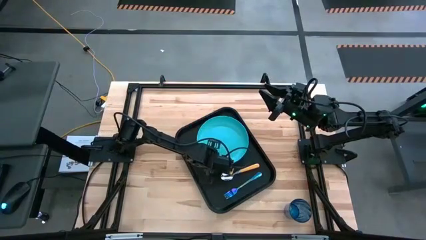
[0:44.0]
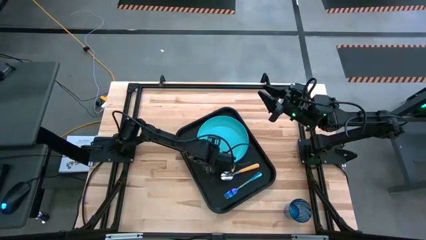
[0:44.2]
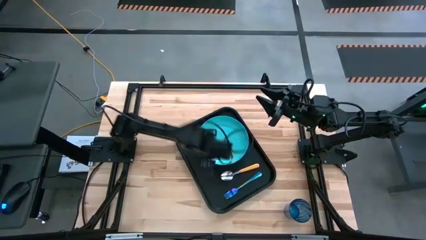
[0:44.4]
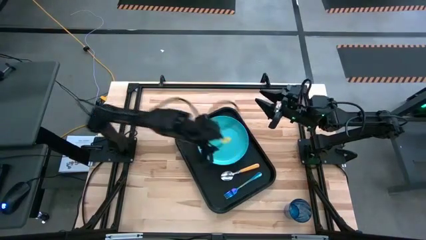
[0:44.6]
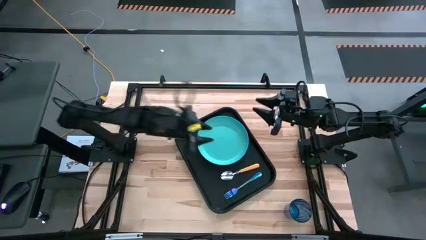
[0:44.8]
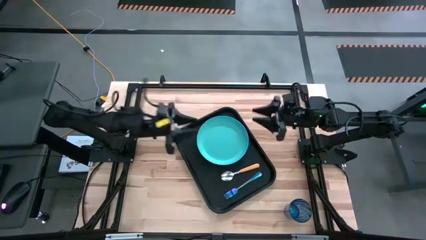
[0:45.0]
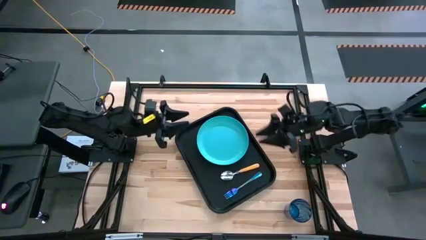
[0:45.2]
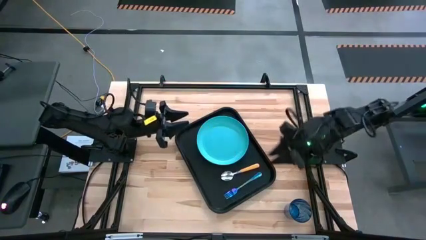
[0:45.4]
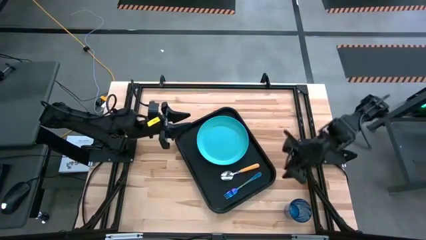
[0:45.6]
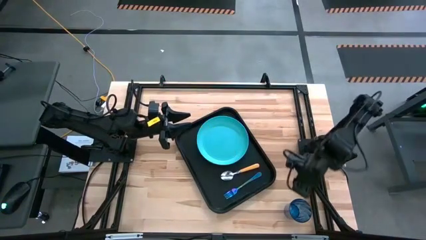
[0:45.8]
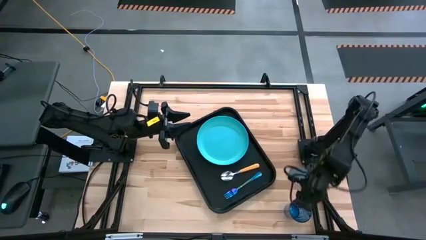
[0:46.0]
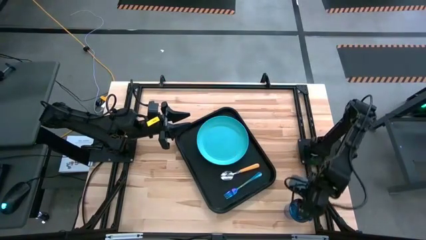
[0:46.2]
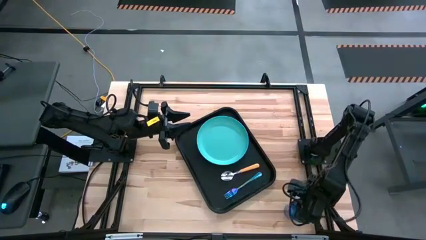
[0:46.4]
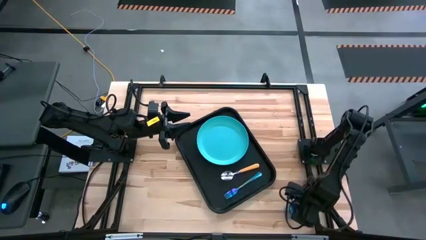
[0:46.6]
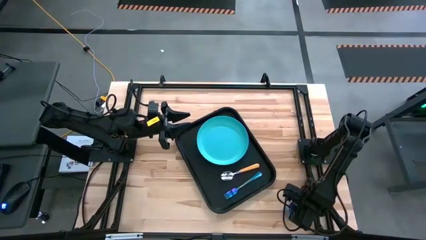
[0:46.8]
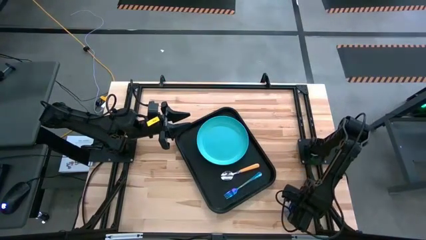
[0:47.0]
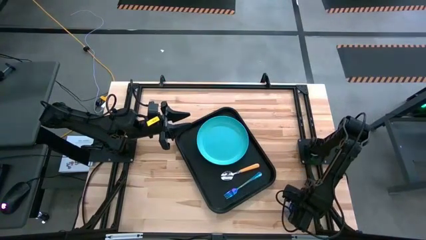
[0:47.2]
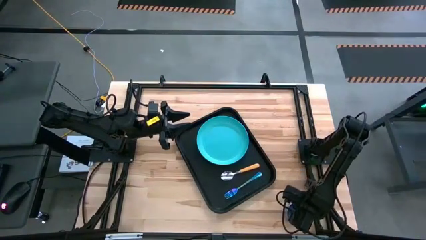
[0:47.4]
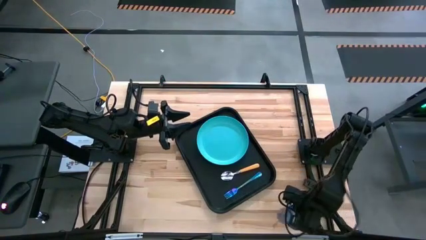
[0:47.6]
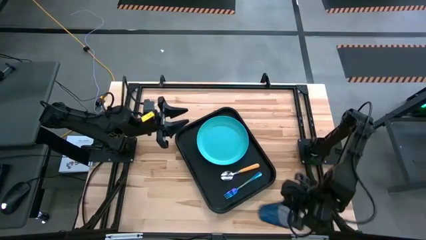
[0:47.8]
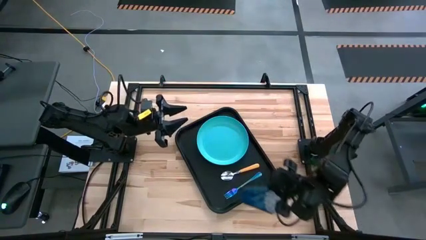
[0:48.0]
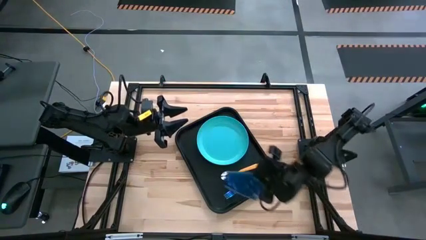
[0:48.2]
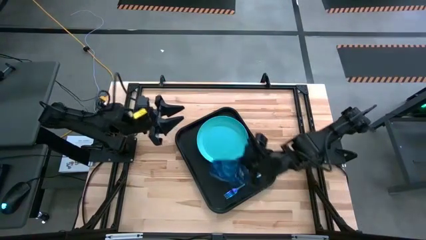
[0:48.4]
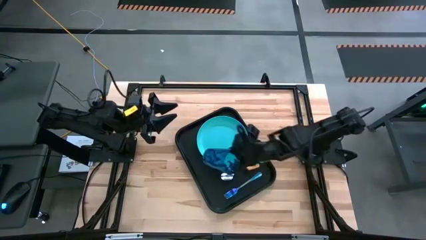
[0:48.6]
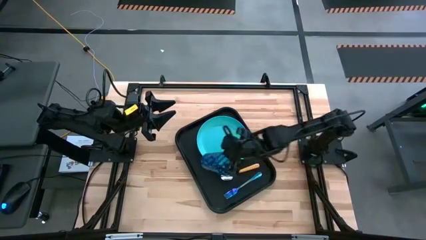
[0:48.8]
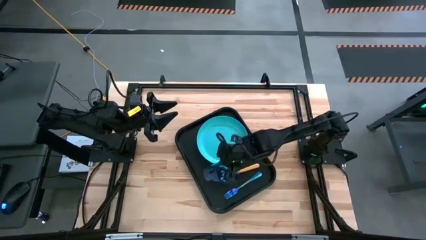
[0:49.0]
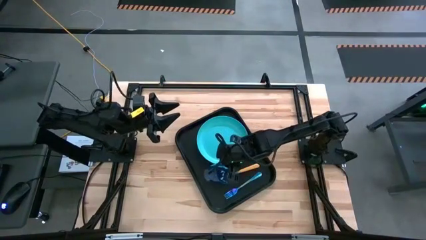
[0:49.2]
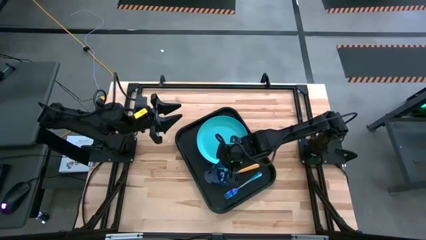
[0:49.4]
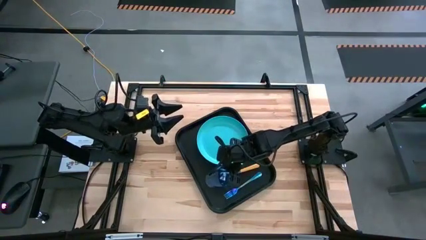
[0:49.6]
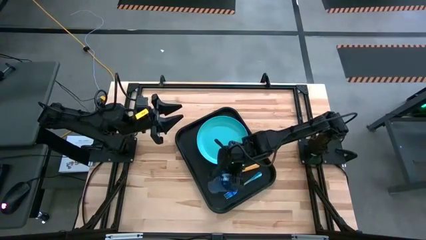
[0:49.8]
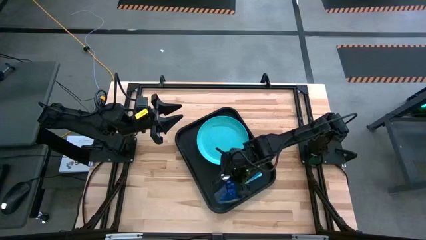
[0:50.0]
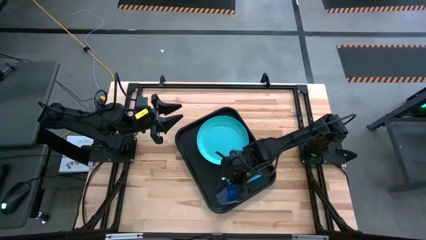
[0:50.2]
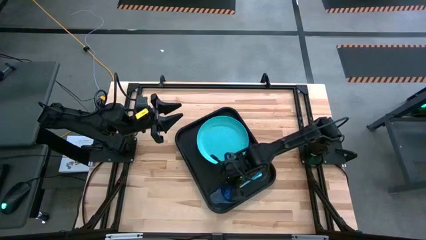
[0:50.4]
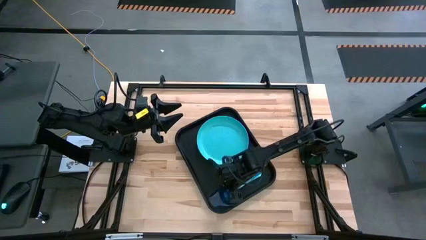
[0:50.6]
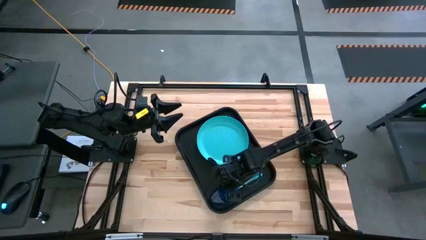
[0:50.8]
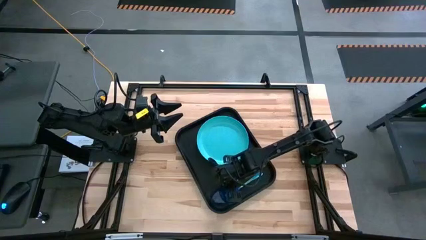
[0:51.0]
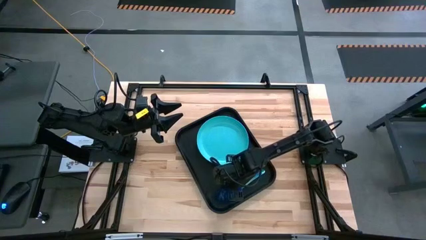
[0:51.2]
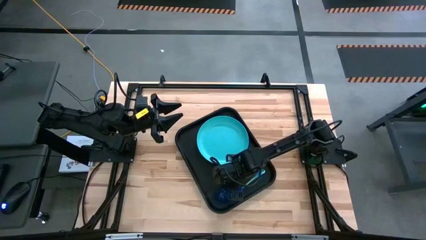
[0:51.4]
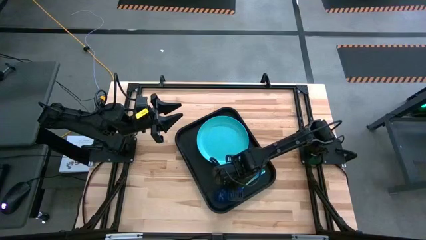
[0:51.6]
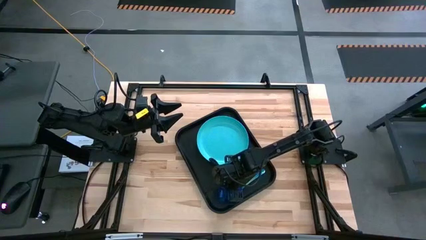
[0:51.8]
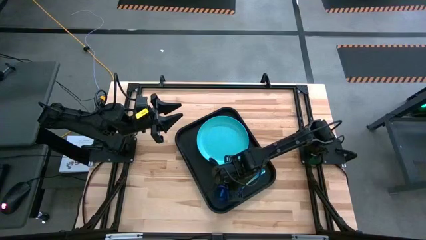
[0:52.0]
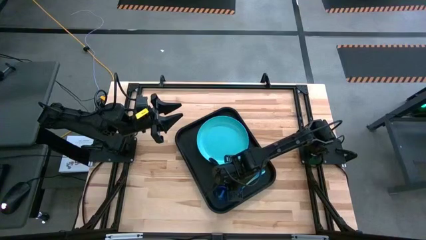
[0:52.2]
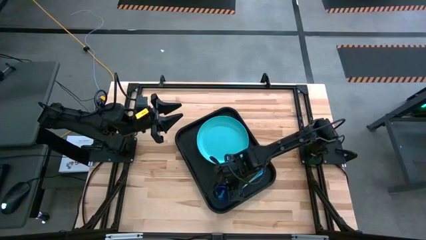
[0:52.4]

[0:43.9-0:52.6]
Task: Pick and place plate/cup/fork/spoon on tray
Put the blue glass on the black serving tray to the top of the blue fork

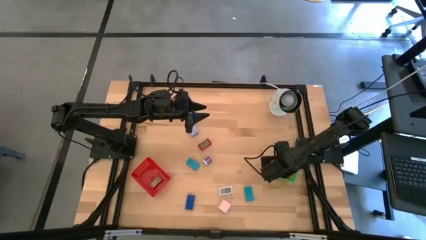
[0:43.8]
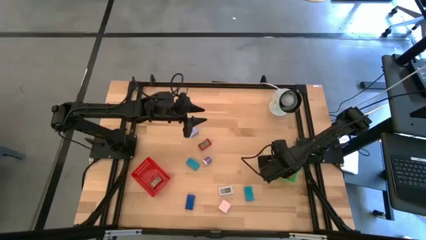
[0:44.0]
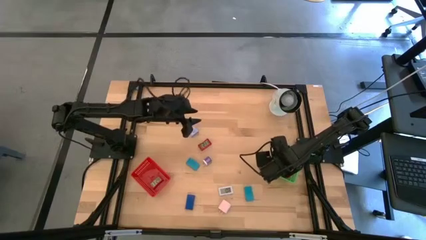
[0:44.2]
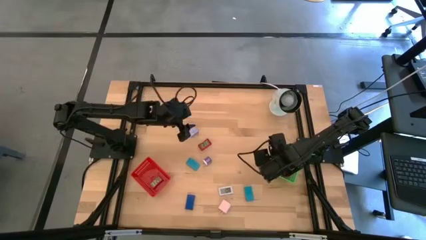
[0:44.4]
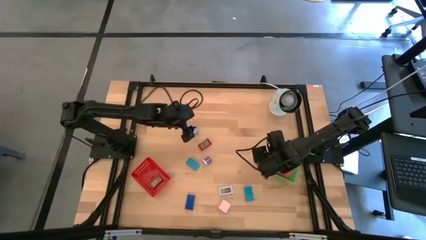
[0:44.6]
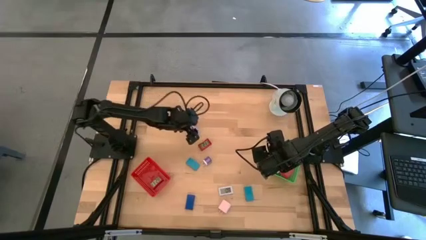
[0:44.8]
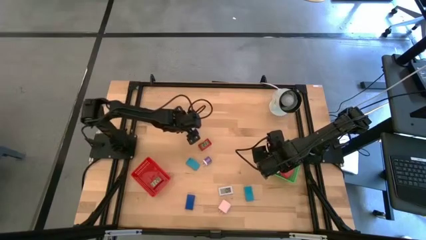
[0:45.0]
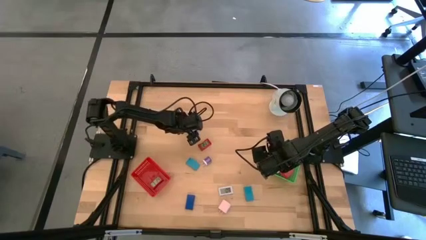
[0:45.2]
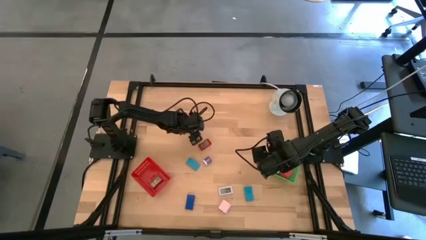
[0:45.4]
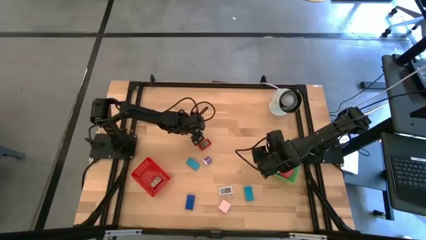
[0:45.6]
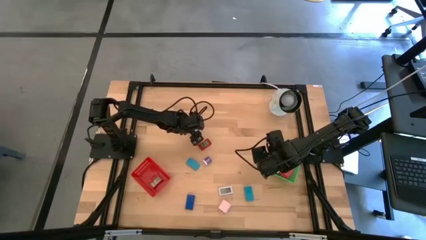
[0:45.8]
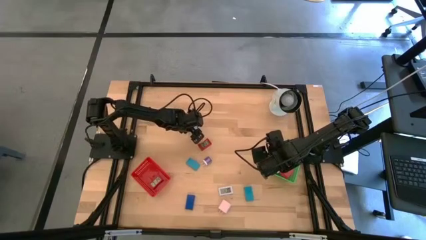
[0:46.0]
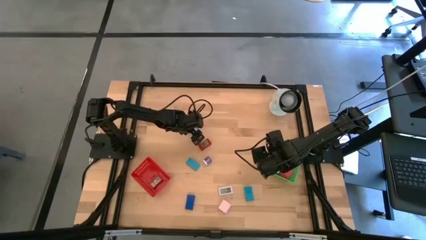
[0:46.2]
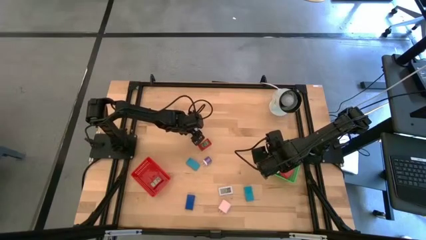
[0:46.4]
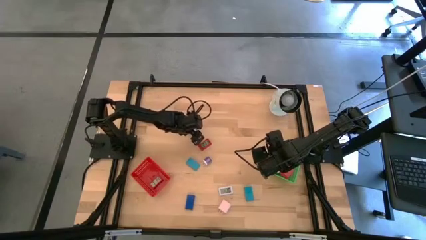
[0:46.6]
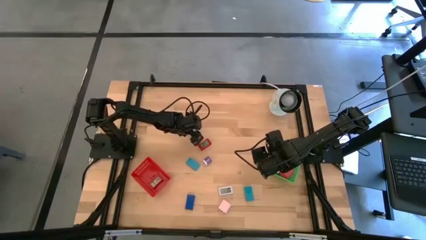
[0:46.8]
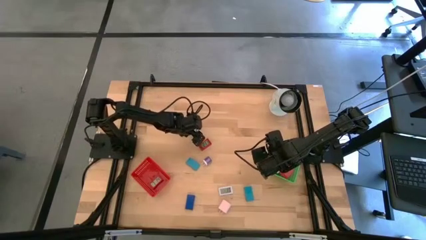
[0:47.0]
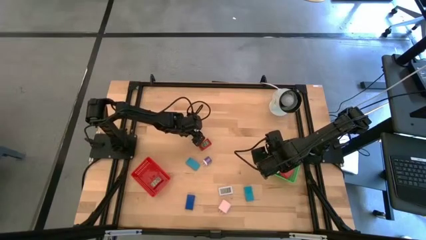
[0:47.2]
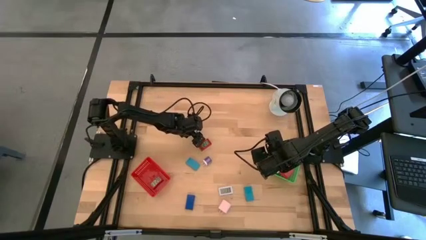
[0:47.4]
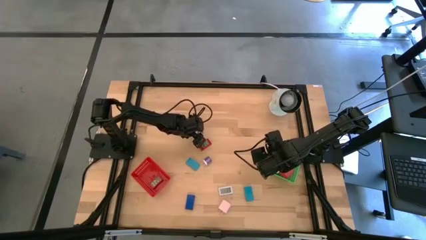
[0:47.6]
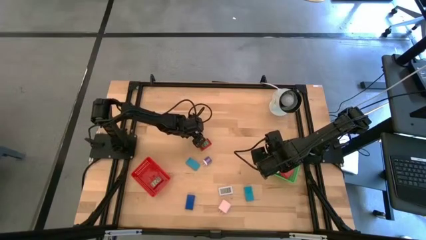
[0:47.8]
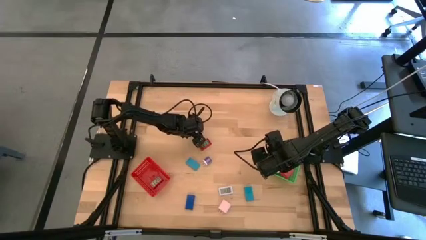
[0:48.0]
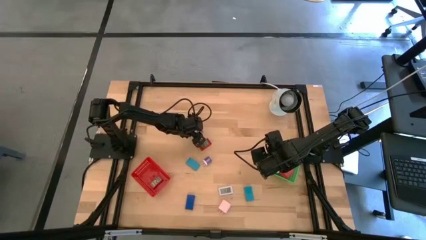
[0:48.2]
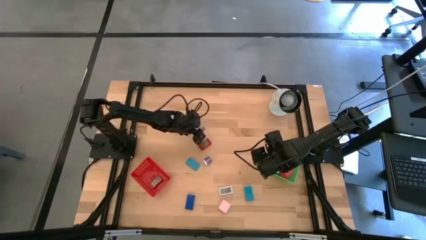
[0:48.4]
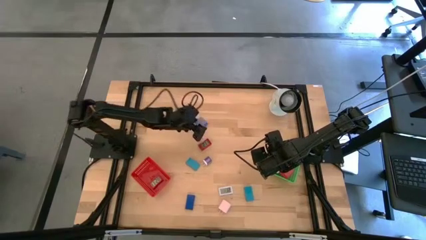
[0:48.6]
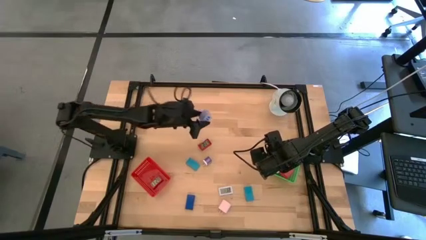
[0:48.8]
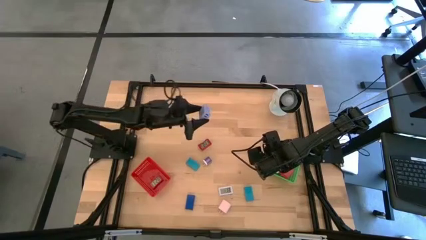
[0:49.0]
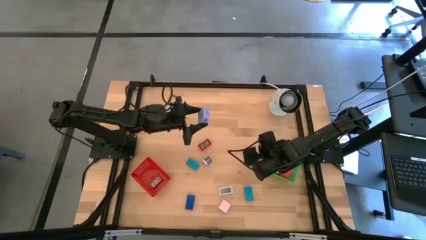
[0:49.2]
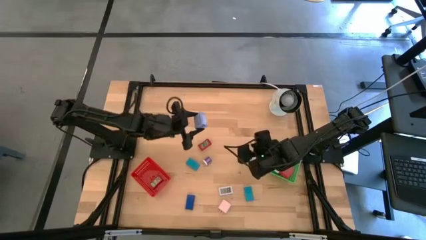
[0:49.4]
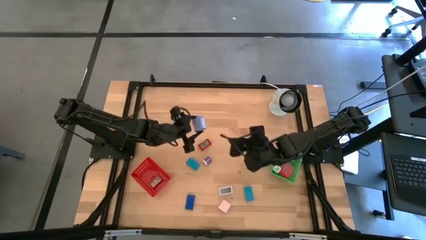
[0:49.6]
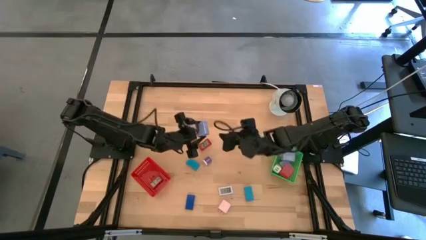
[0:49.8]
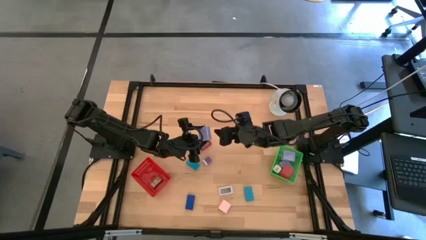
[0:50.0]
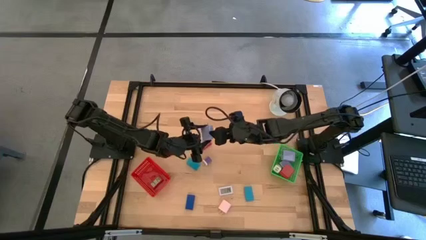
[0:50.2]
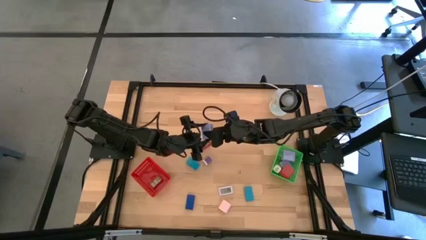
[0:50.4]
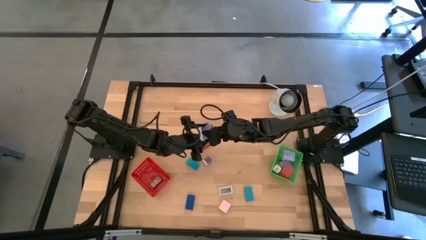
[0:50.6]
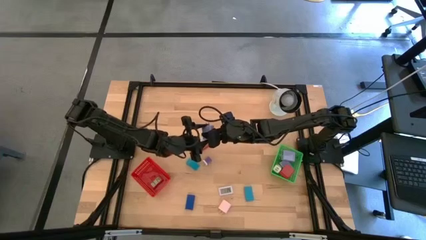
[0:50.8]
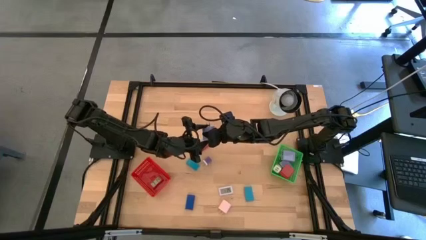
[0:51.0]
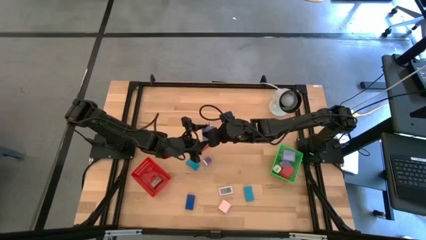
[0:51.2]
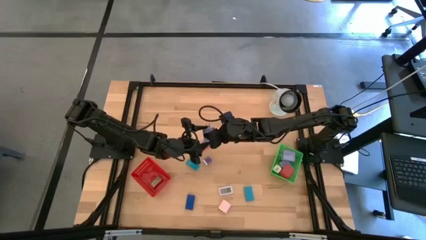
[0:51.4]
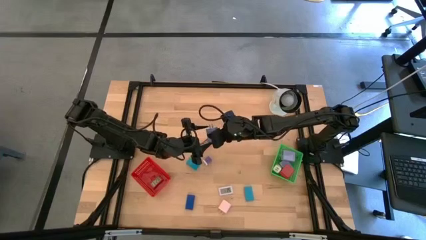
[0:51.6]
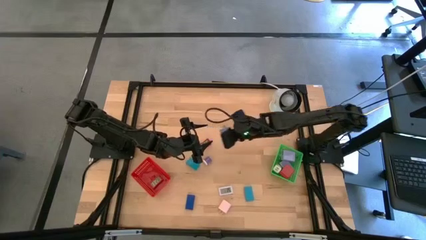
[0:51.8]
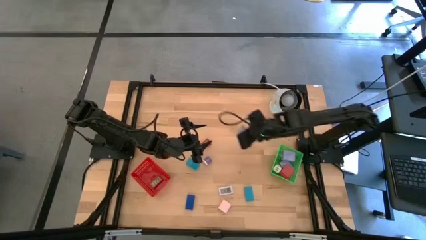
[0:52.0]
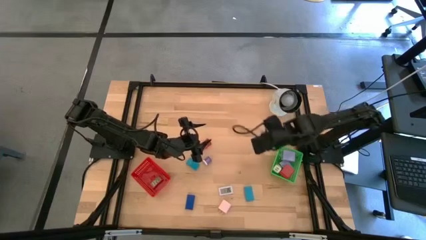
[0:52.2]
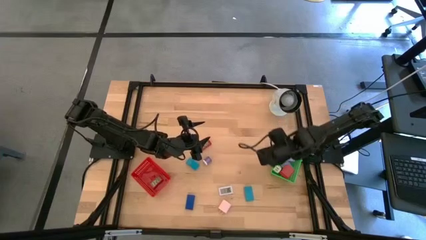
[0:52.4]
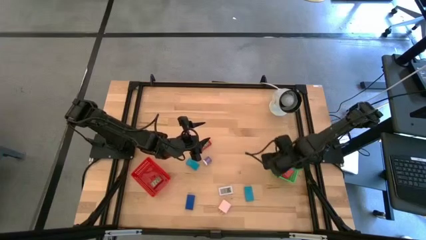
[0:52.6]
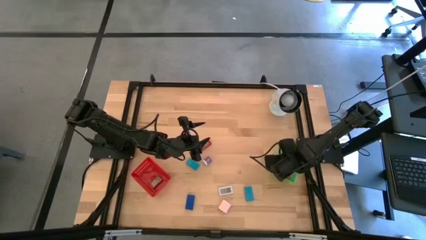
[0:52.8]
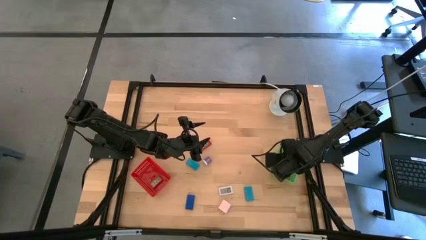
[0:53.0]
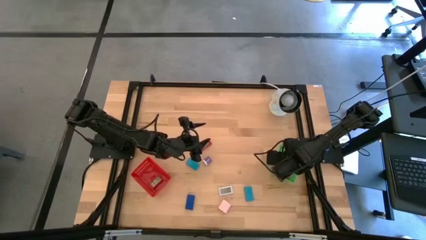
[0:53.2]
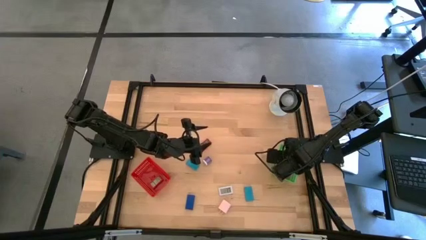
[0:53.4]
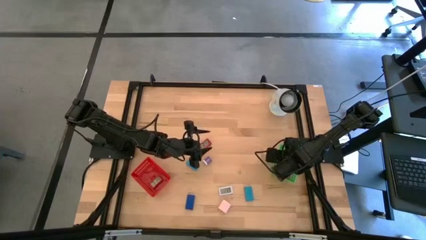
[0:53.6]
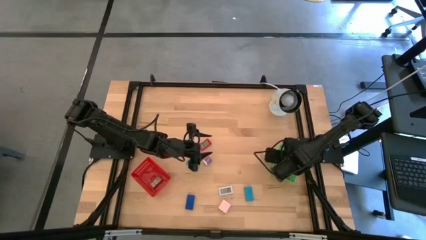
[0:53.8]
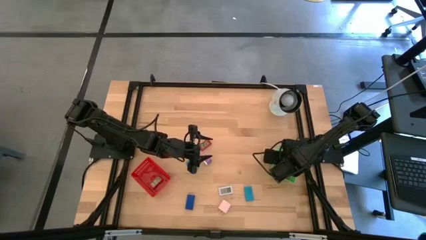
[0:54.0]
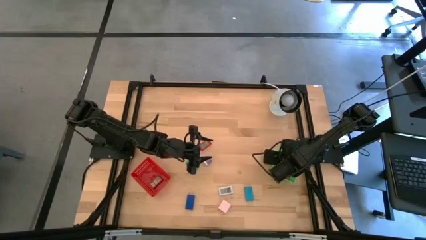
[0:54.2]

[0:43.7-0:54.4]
Task: Pick & Place Office items
Put the light blue power adapter into the green bin
